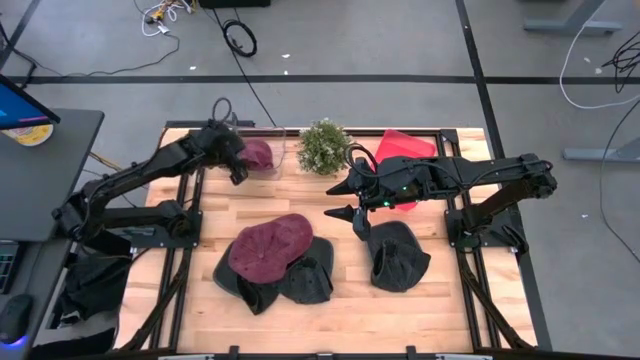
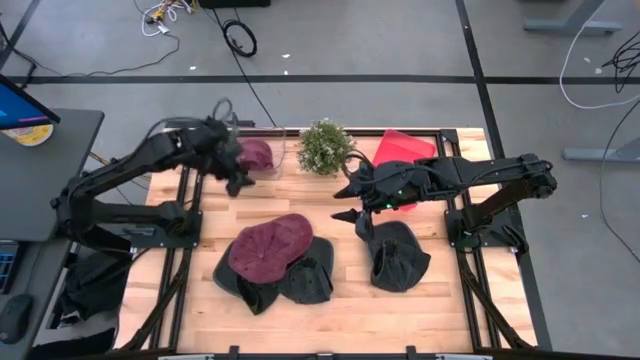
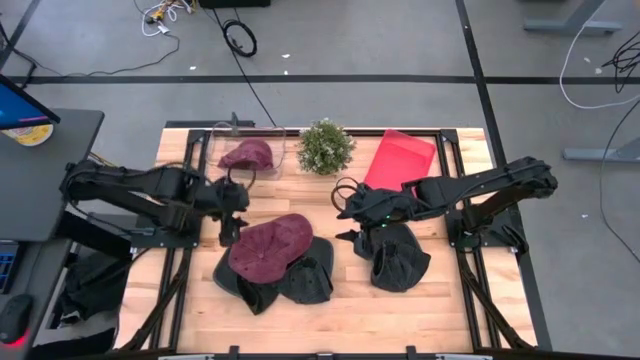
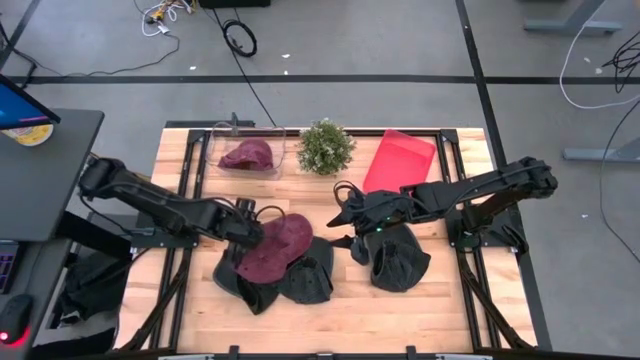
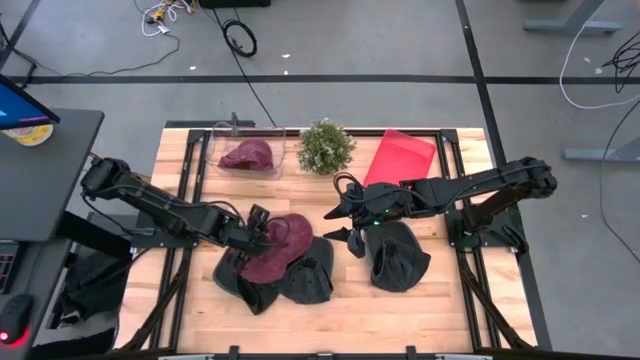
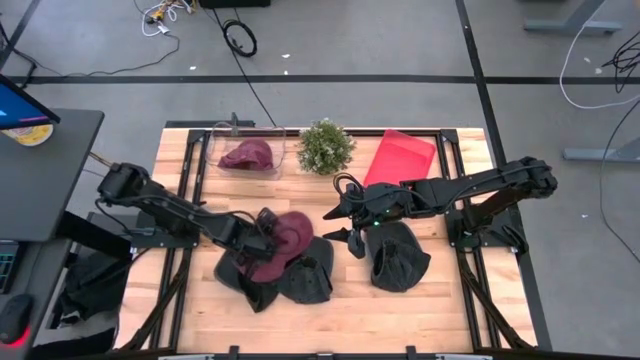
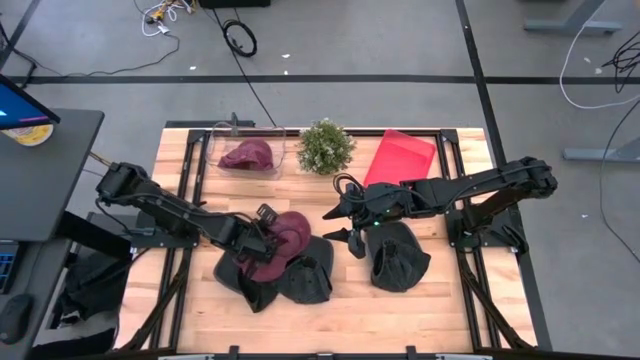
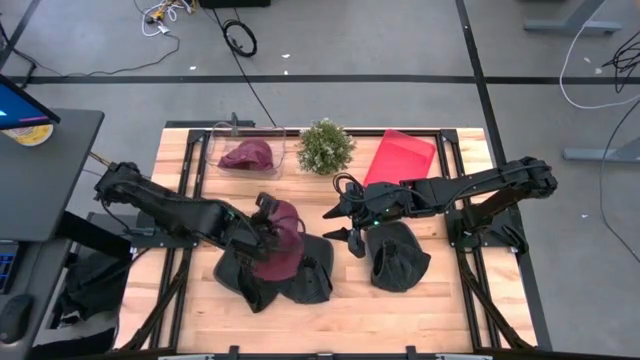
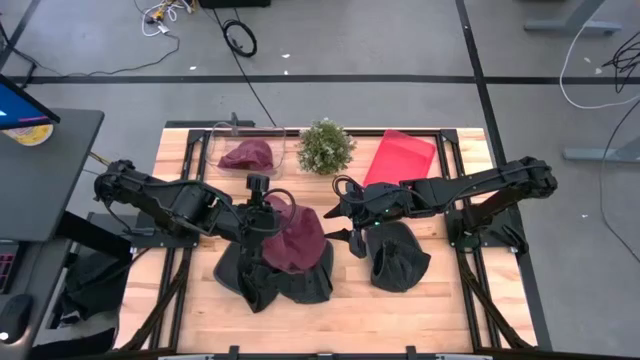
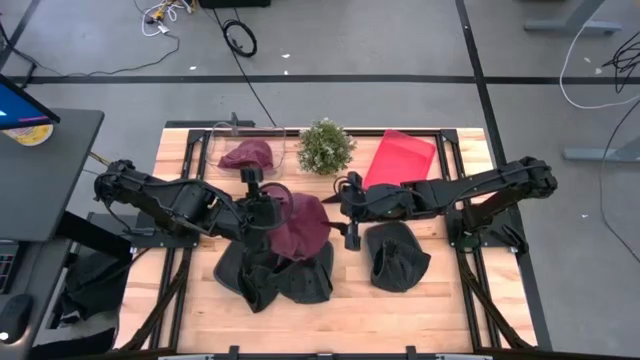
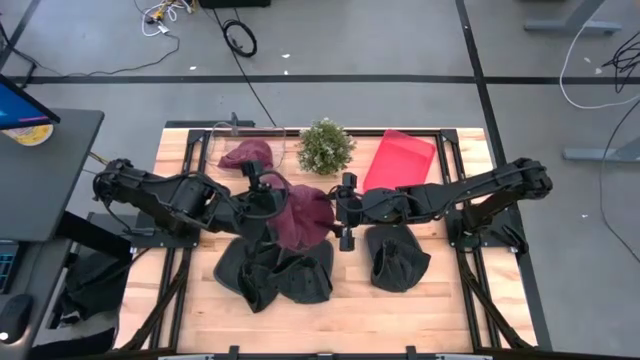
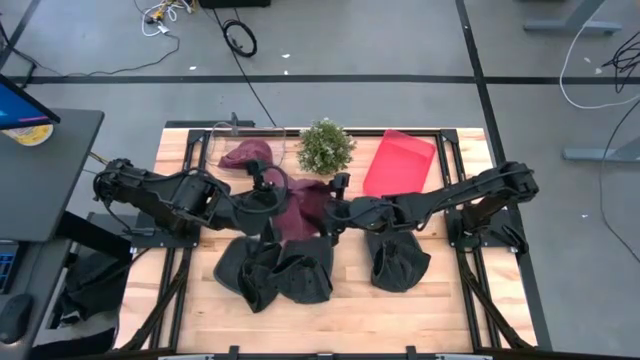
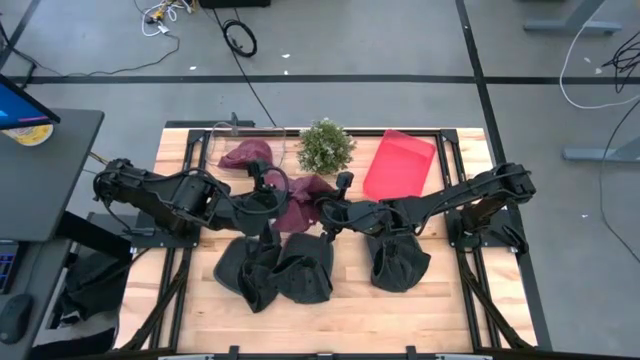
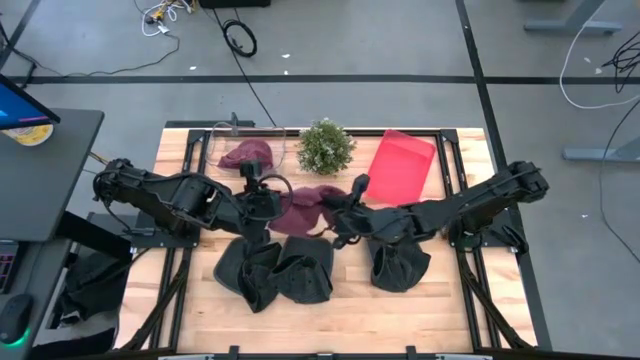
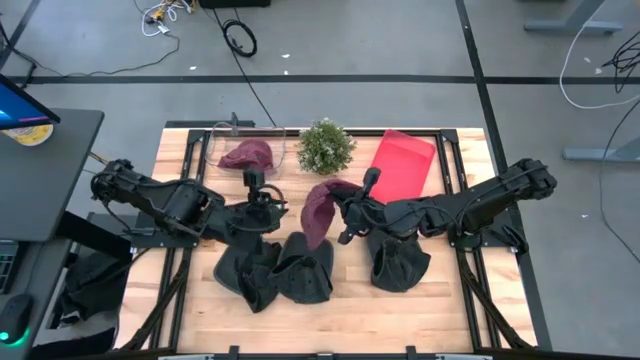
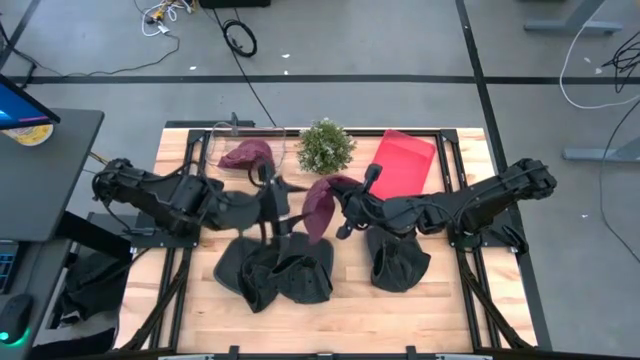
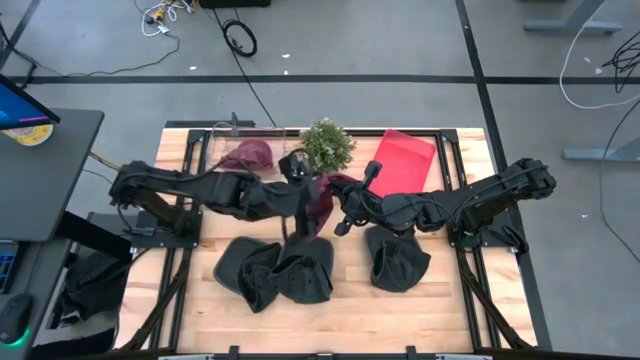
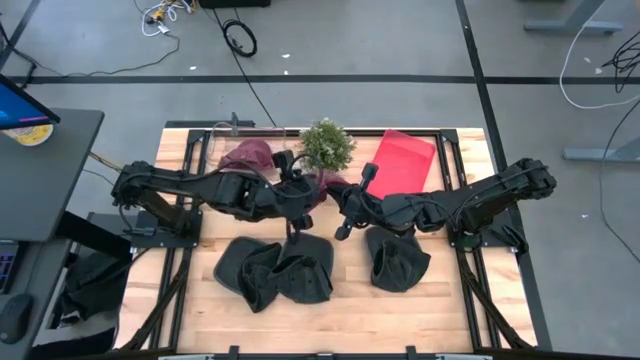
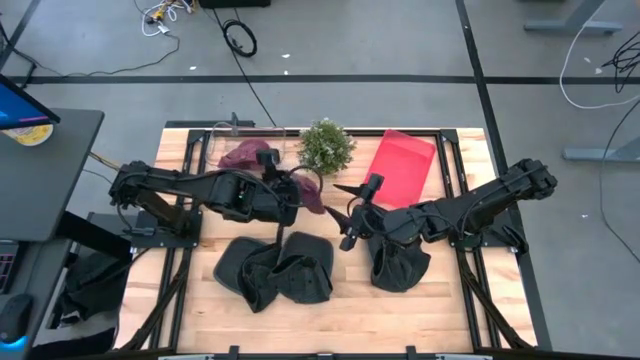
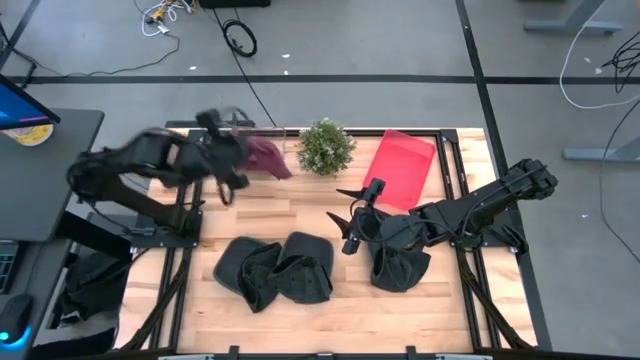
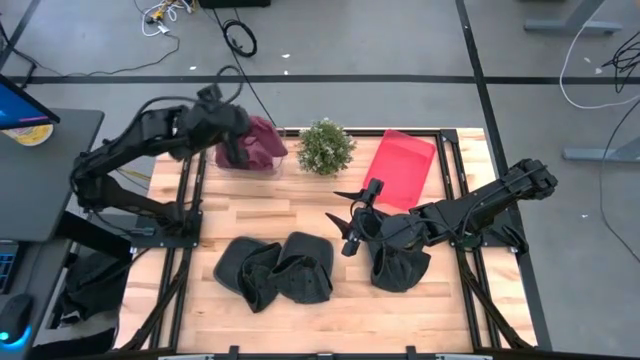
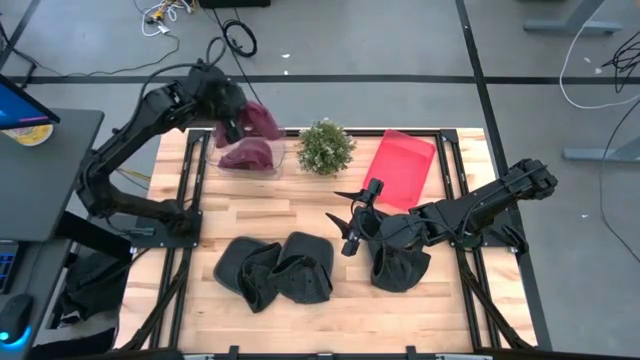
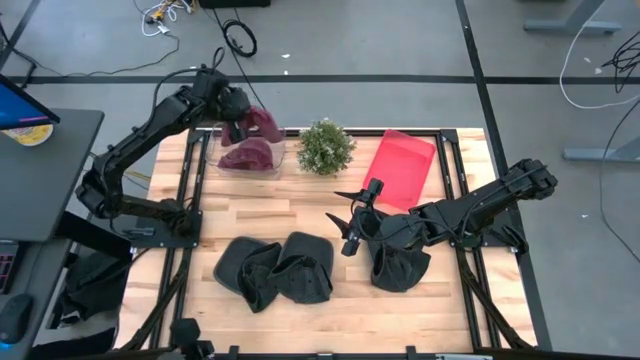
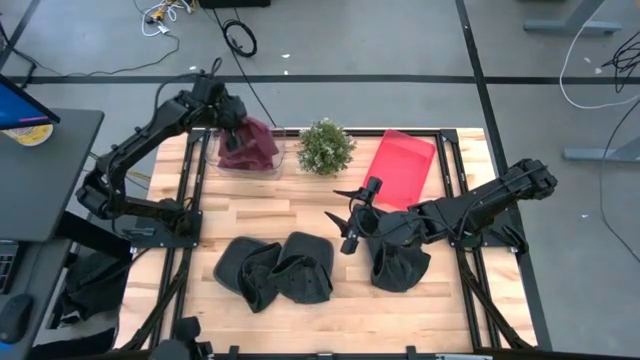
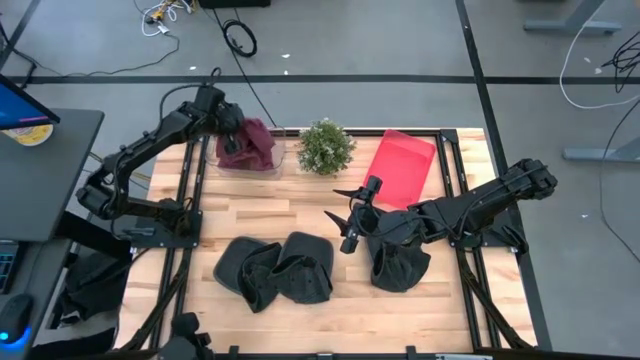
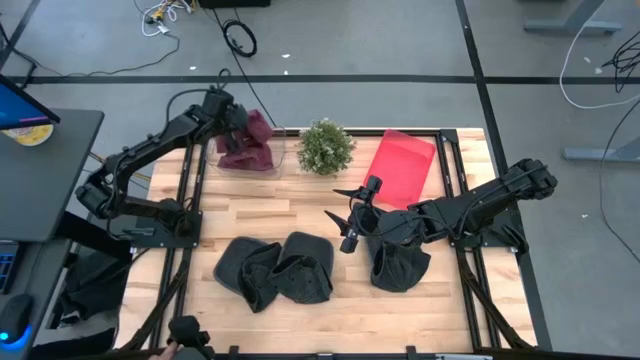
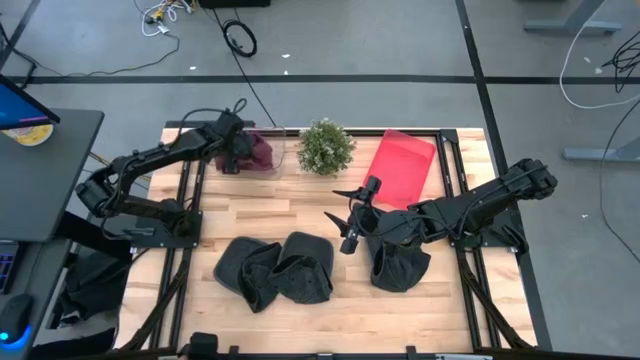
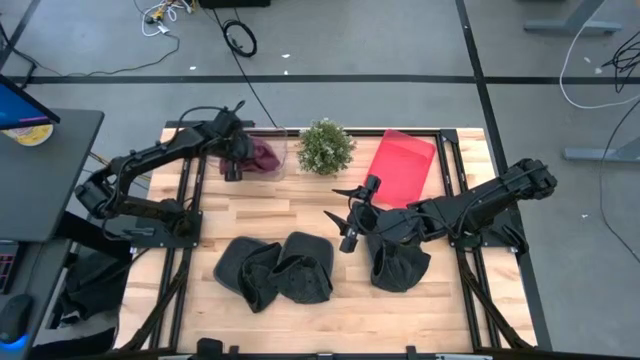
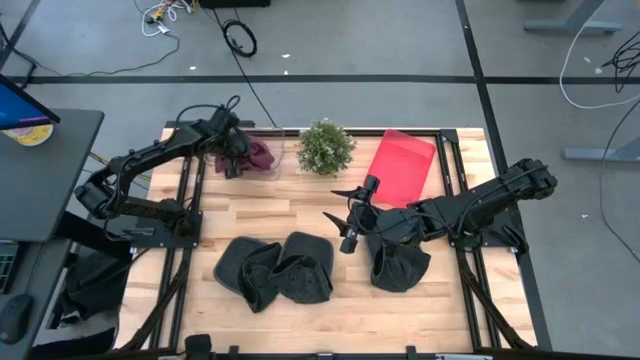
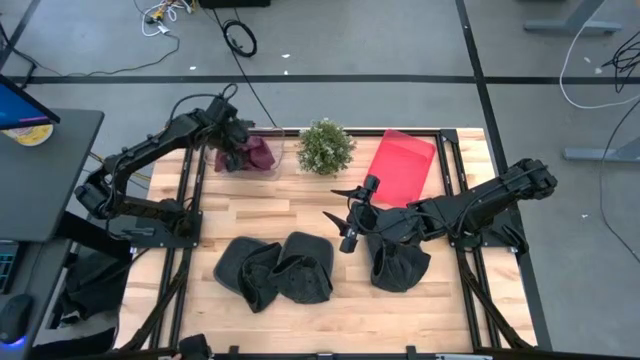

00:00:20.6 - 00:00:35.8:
Task: Pick & Place hat
Put the red cap into the transparent bin

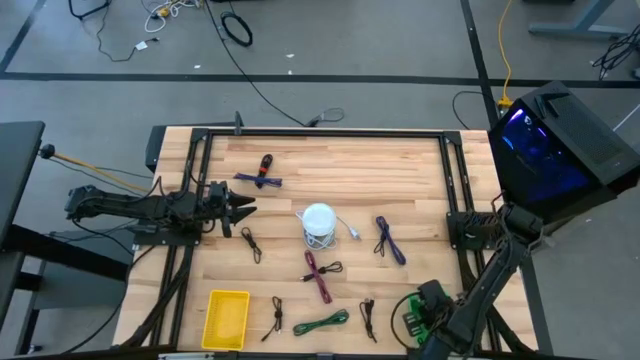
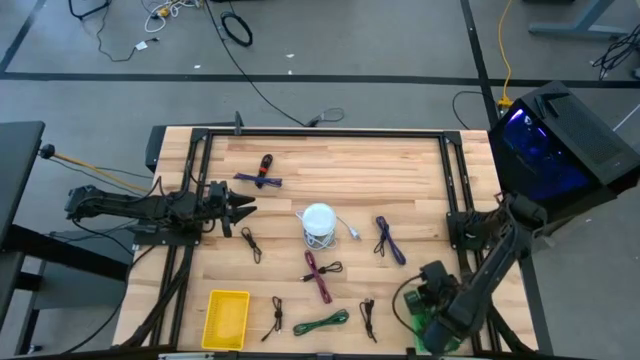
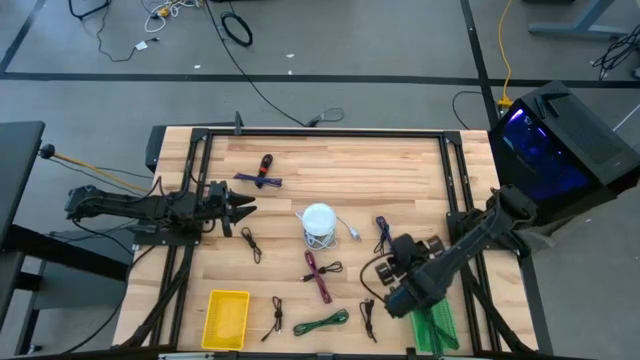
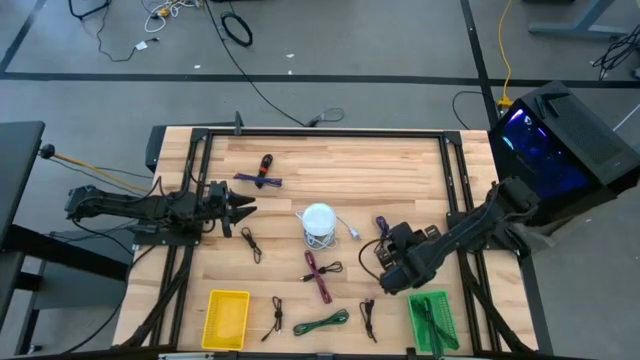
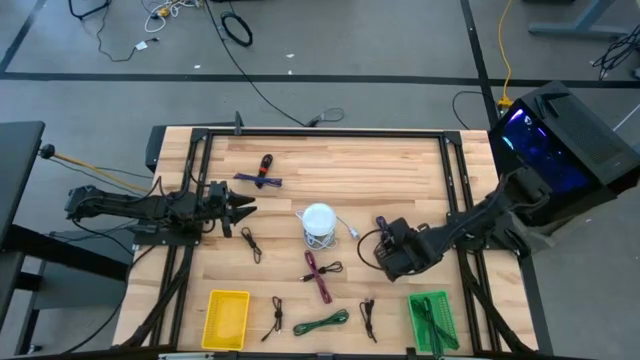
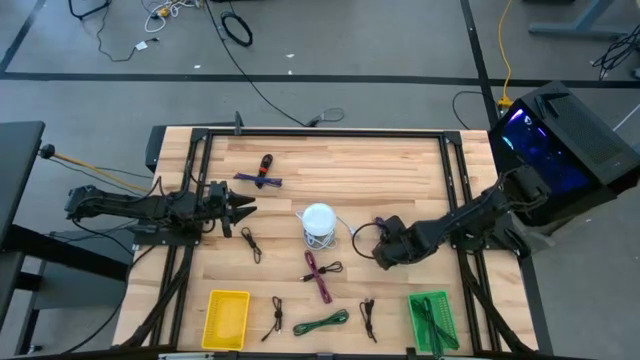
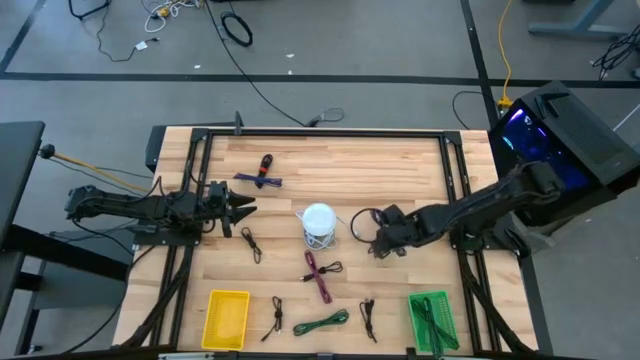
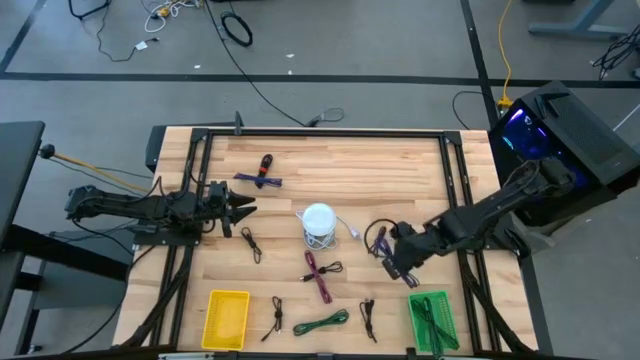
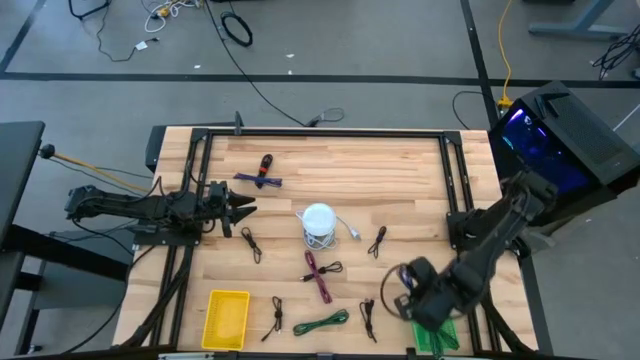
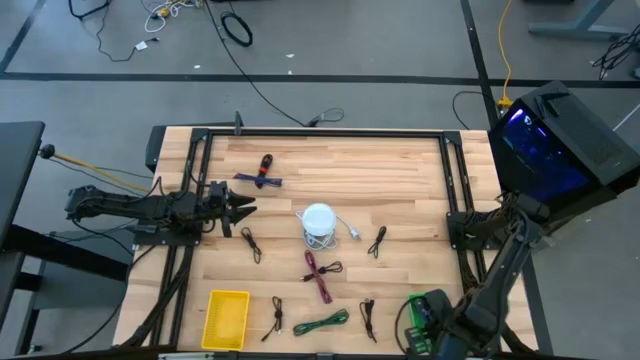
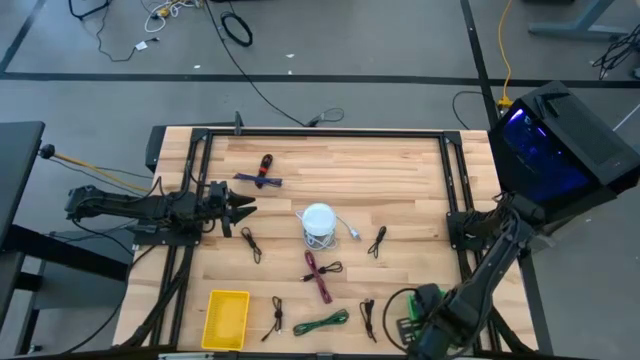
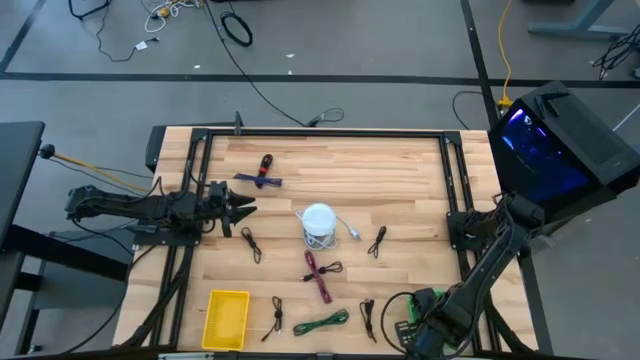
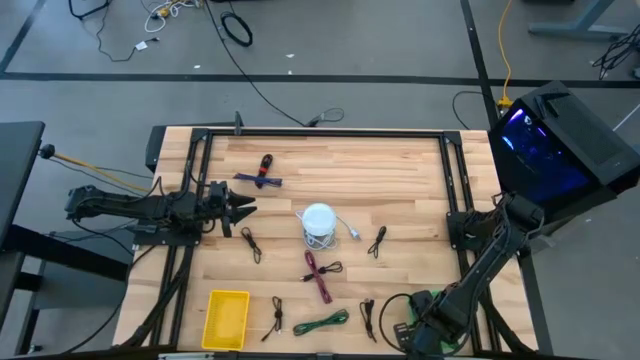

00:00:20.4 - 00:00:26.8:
Task: Pick & Place USB Port
Put the right purple charger cable into the green bin
